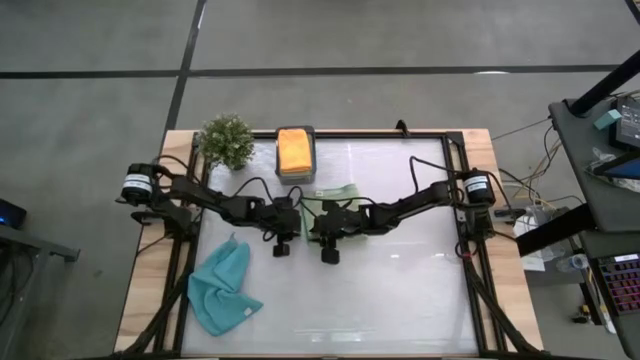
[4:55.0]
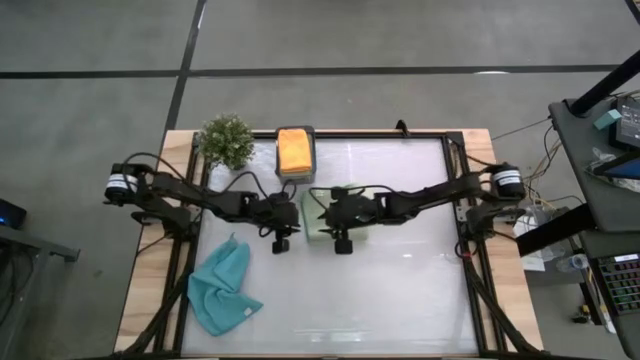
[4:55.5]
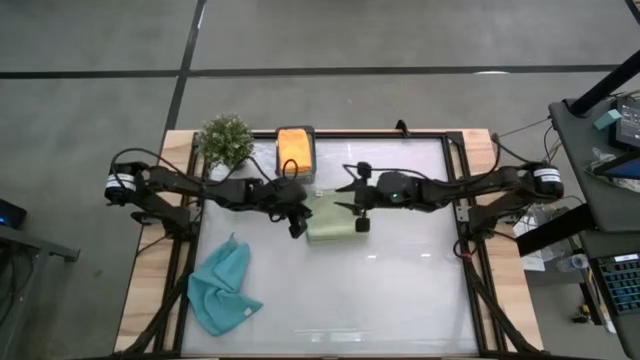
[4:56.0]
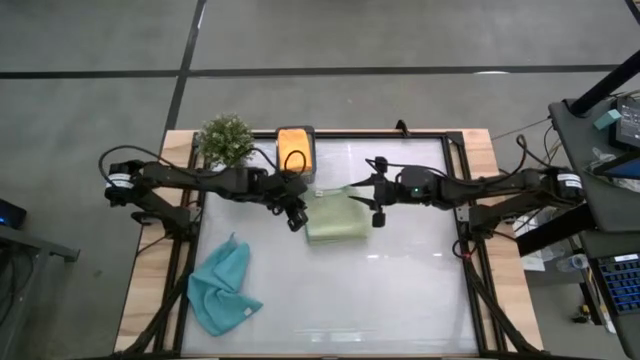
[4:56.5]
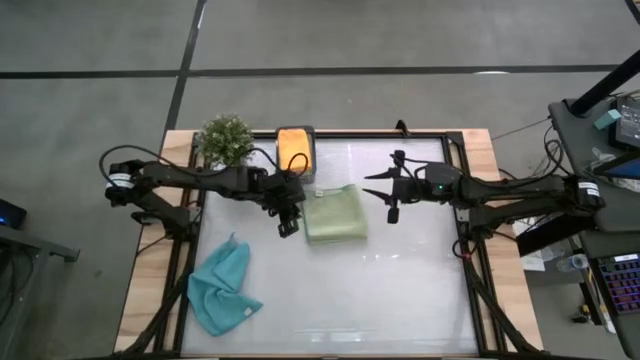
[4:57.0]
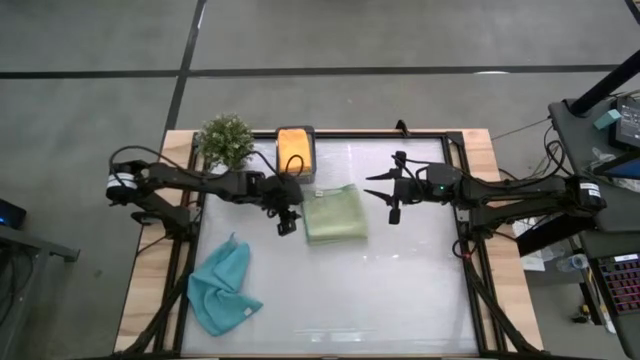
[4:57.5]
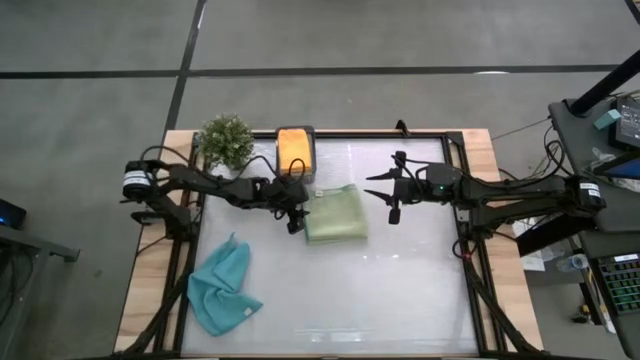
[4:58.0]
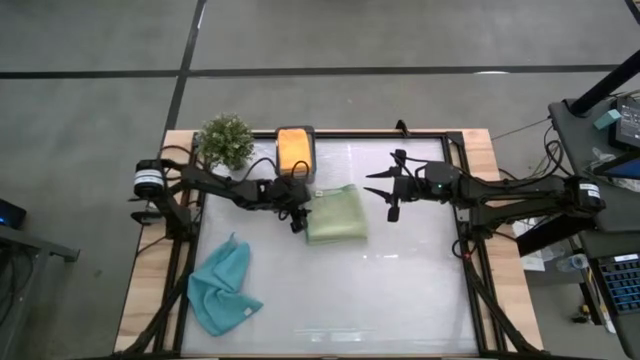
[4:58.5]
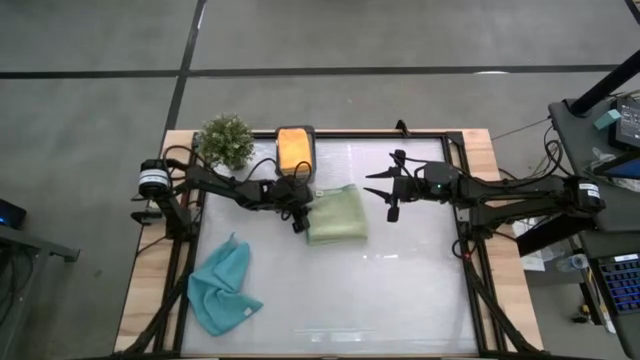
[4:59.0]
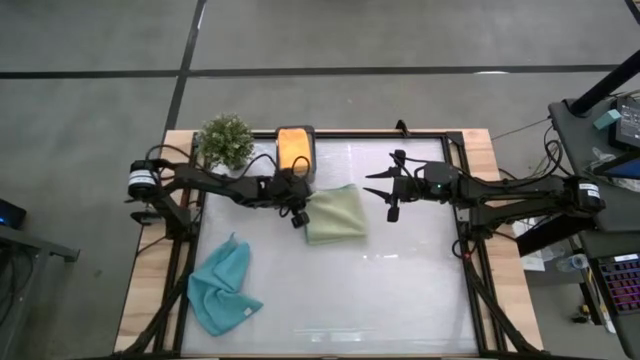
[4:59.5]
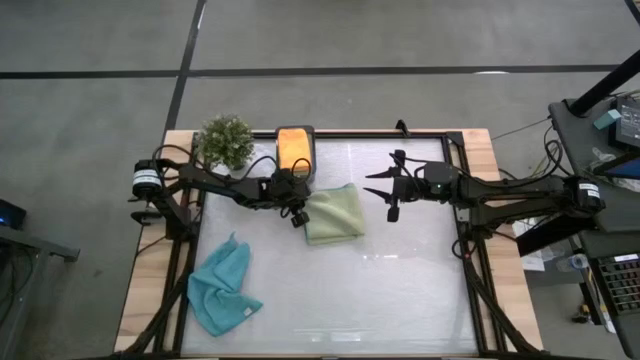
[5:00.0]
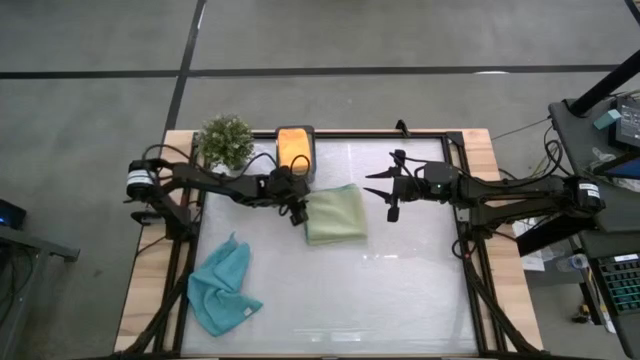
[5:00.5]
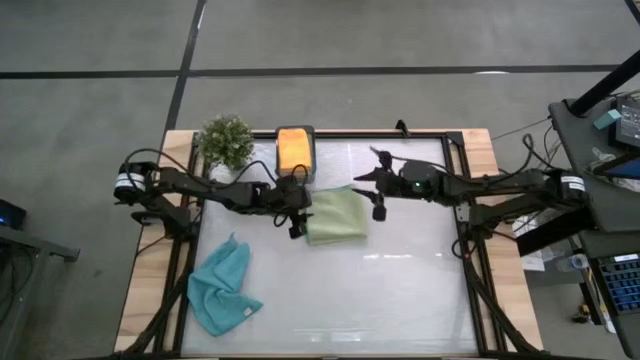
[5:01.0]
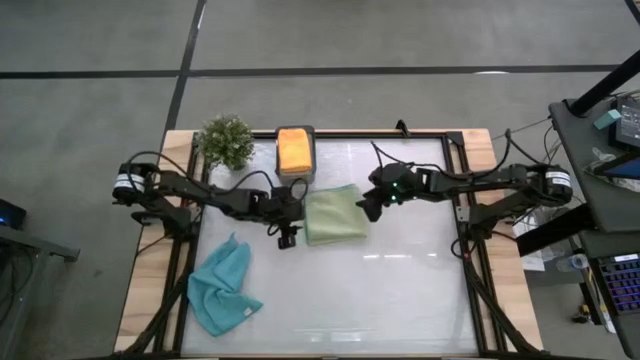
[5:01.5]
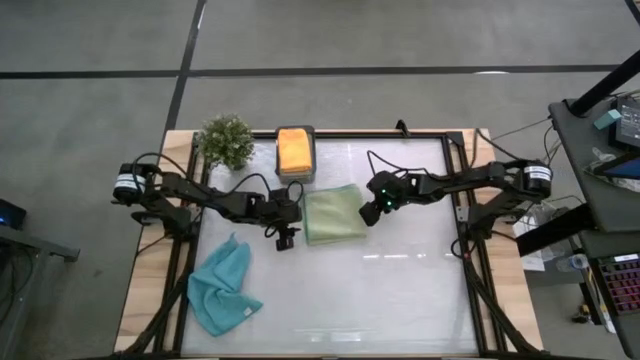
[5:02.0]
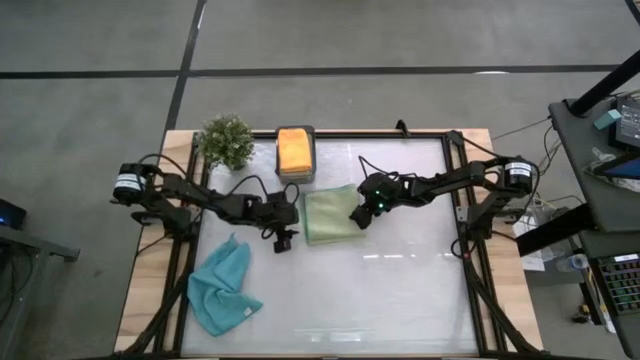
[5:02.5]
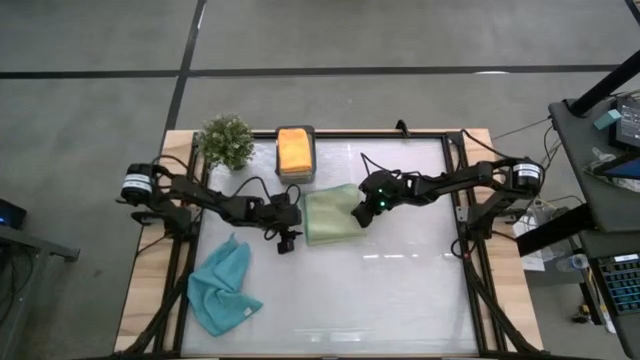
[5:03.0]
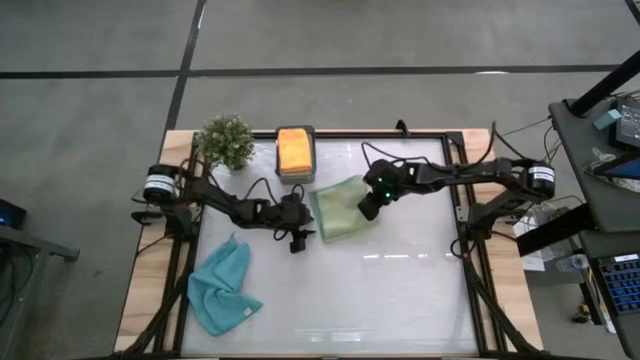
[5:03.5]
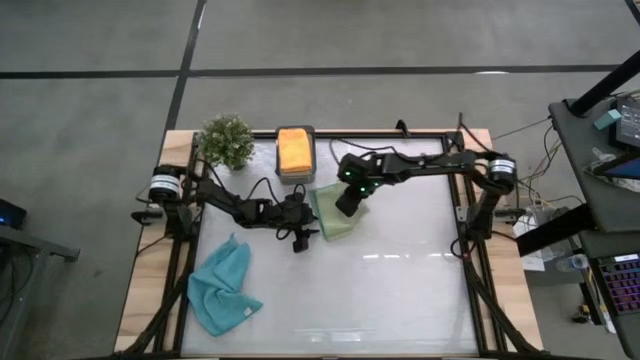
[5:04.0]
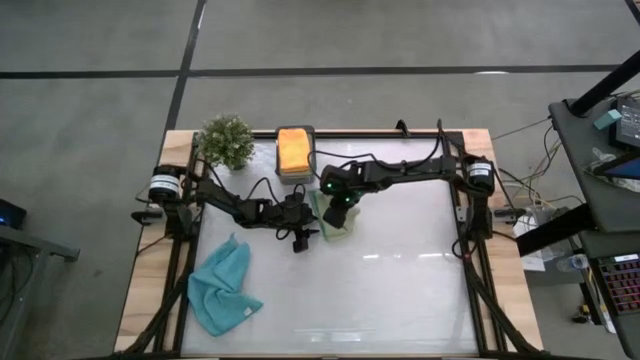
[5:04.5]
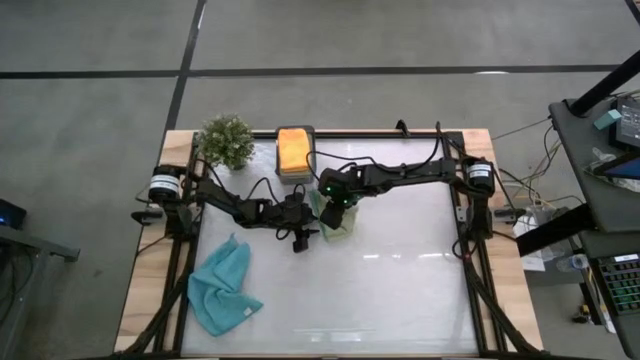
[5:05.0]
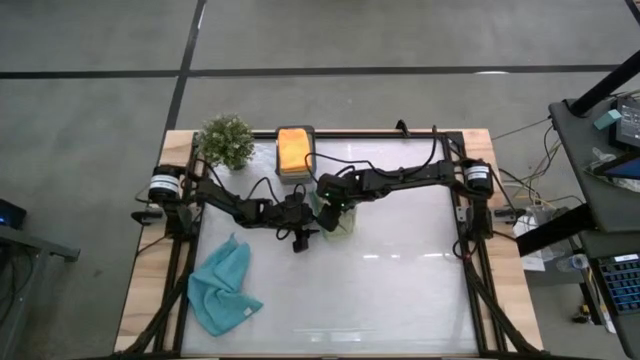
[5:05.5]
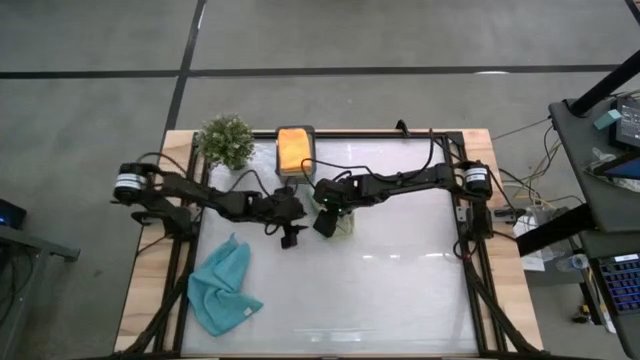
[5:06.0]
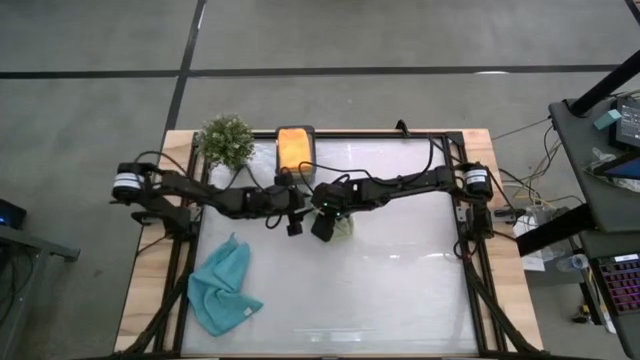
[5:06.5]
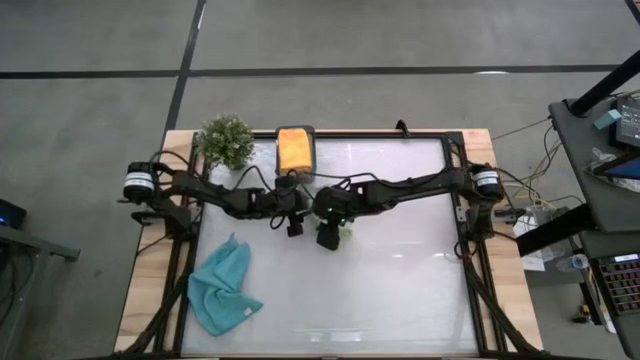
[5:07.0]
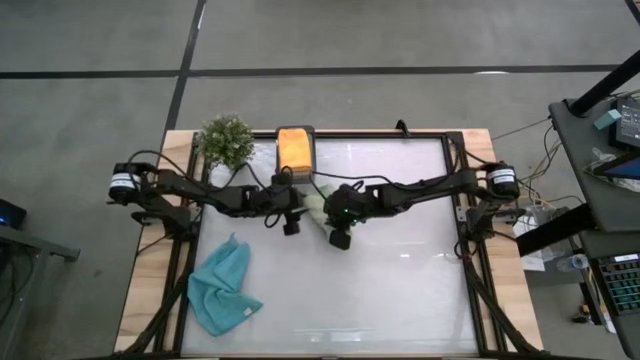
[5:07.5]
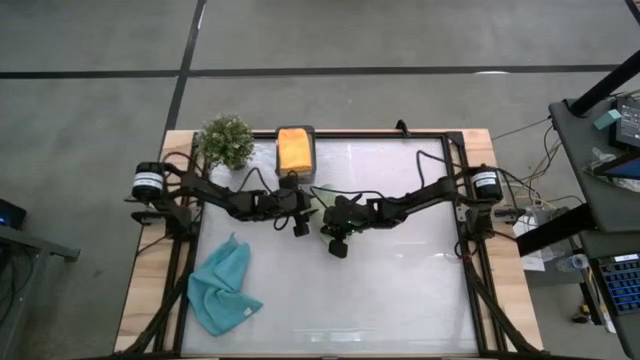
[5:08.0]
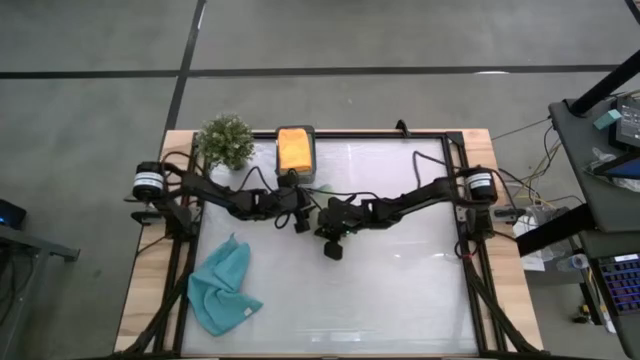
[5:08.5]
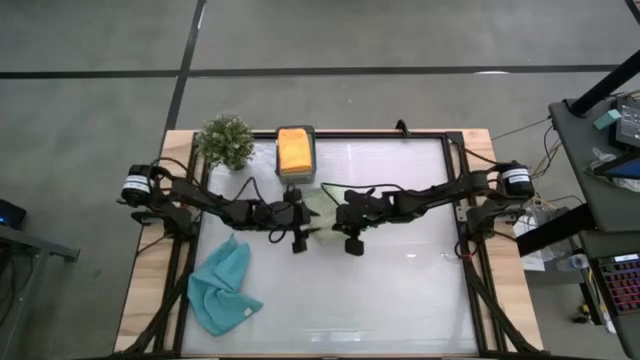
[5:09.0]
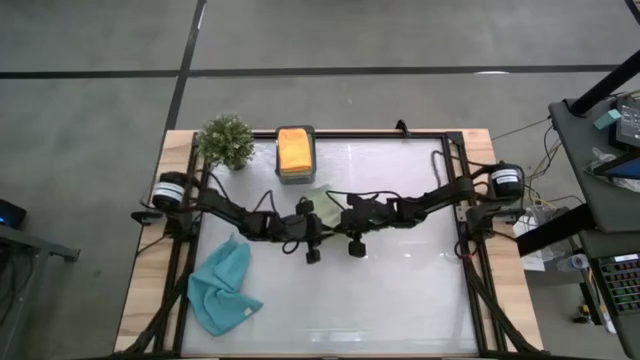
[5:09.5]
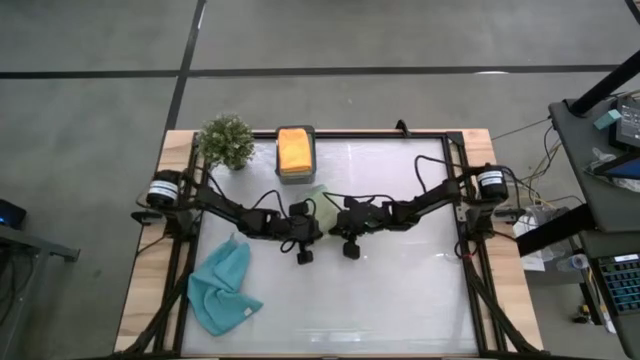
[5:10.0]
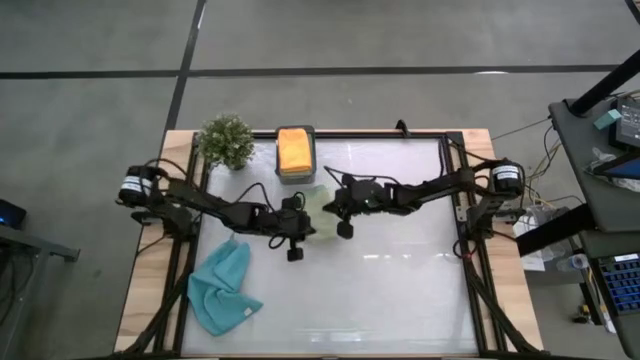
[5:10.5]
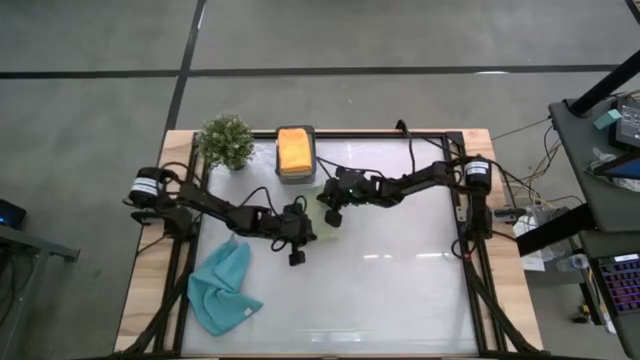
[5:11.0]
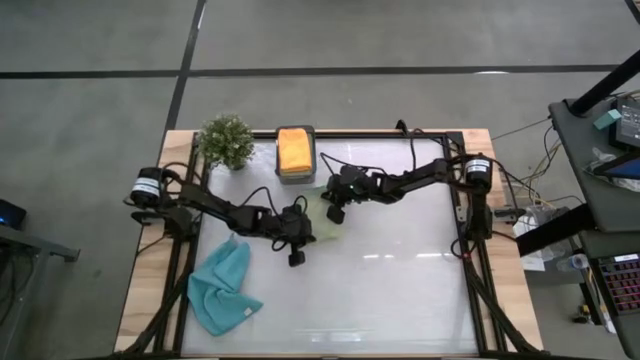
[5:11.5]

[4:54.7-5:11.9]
Task: Fold microfiber towels
Fold the green towel
